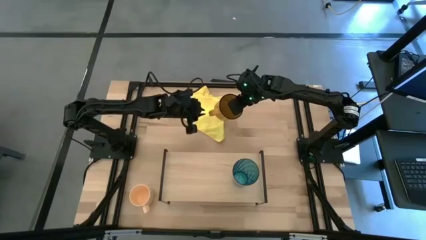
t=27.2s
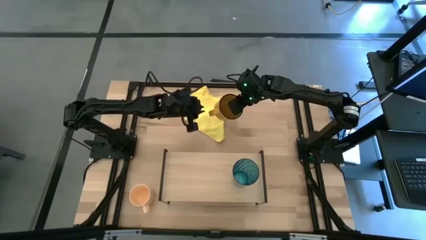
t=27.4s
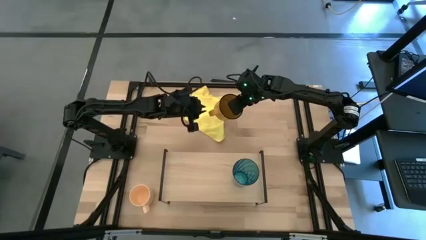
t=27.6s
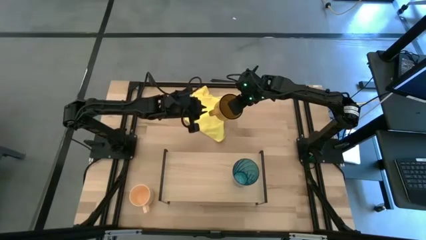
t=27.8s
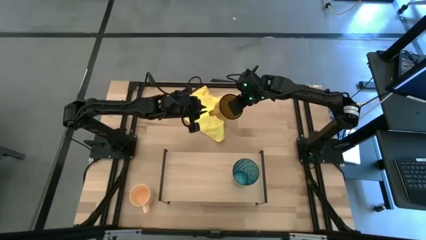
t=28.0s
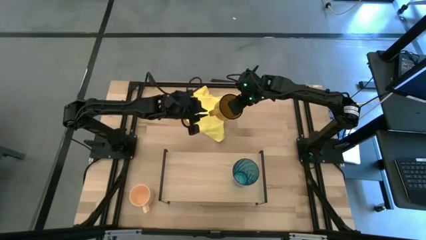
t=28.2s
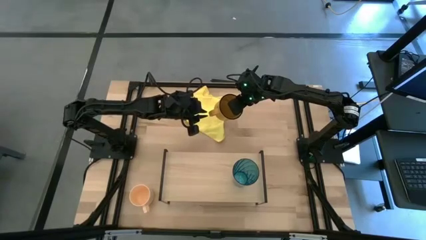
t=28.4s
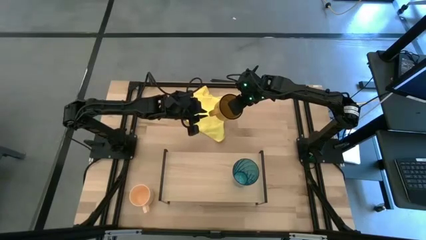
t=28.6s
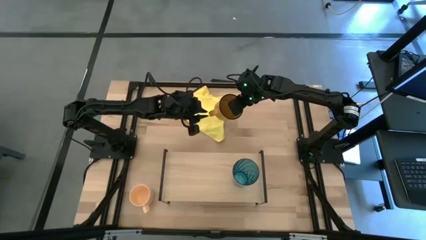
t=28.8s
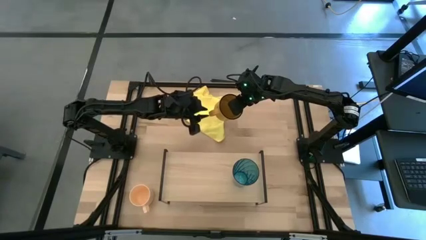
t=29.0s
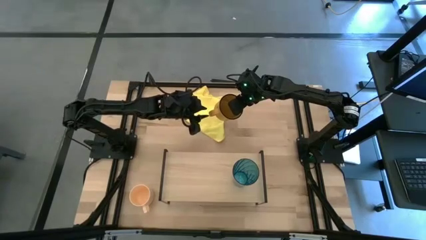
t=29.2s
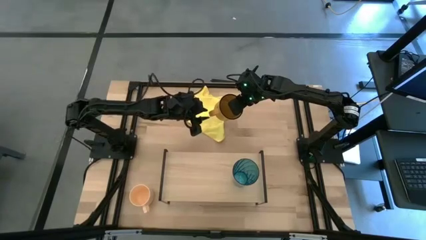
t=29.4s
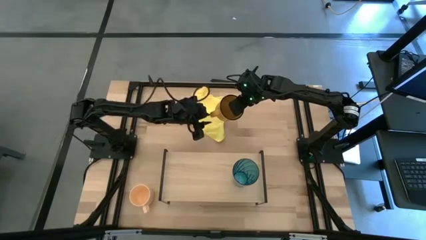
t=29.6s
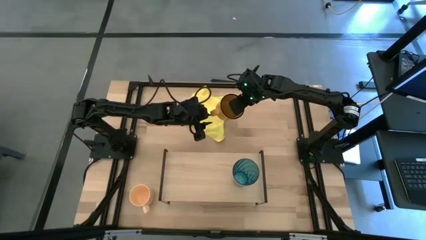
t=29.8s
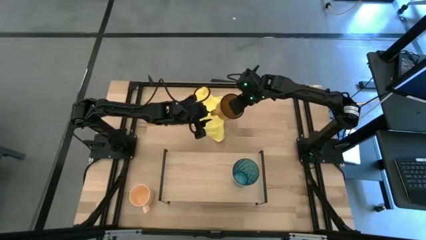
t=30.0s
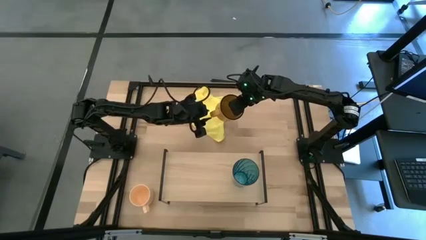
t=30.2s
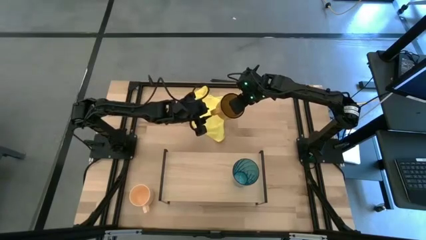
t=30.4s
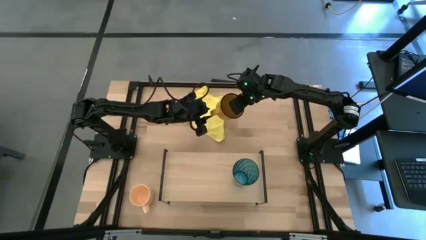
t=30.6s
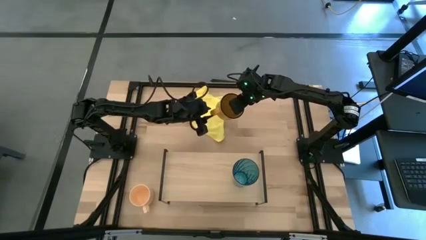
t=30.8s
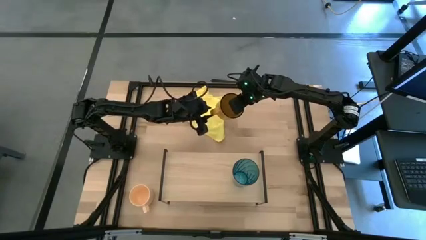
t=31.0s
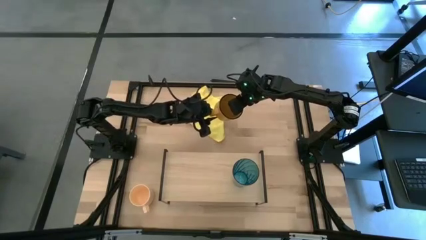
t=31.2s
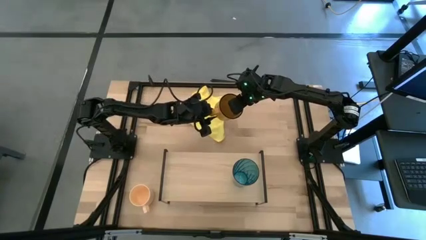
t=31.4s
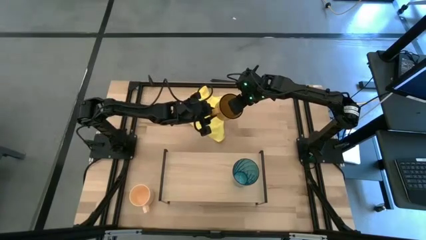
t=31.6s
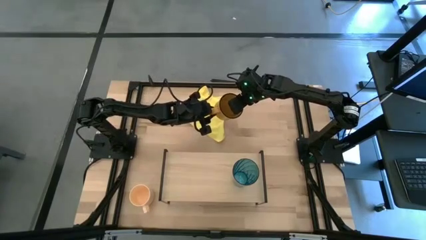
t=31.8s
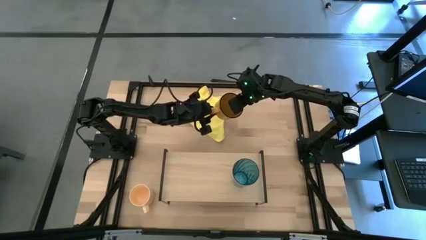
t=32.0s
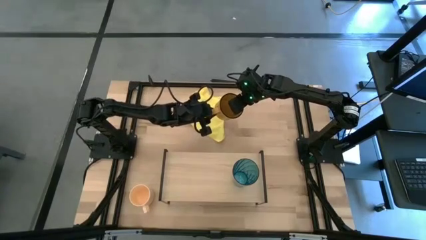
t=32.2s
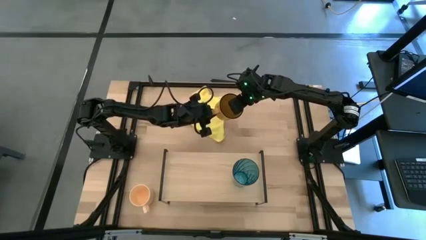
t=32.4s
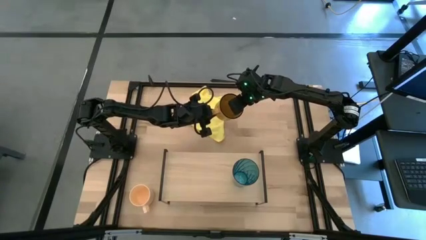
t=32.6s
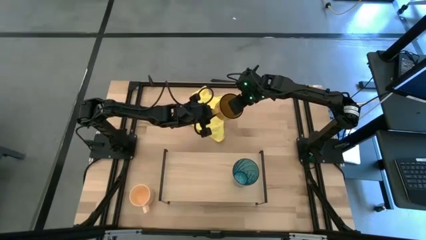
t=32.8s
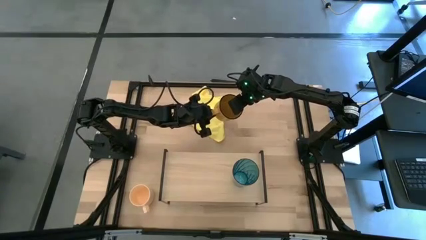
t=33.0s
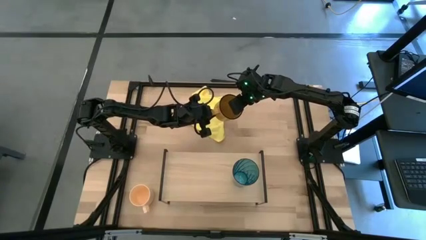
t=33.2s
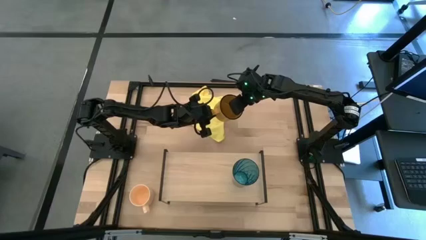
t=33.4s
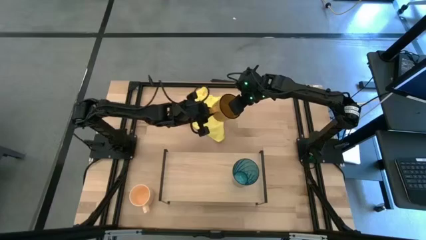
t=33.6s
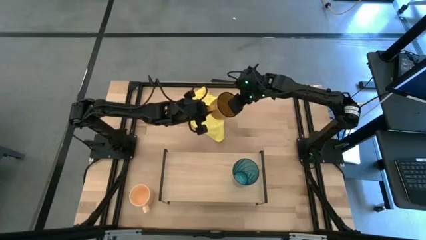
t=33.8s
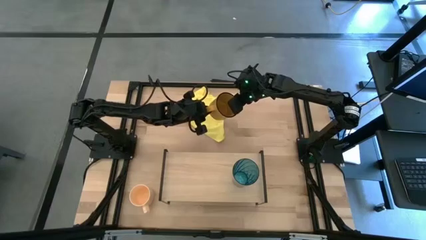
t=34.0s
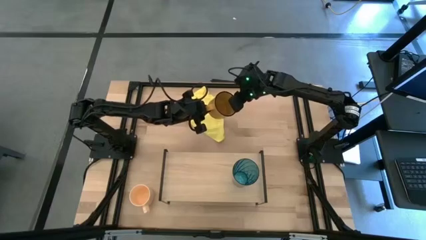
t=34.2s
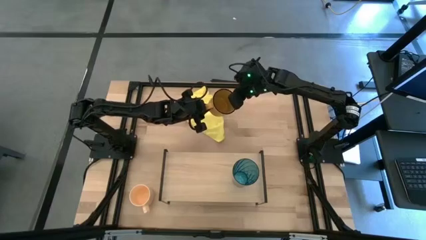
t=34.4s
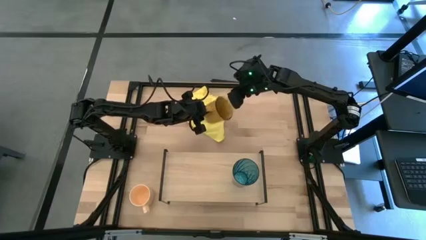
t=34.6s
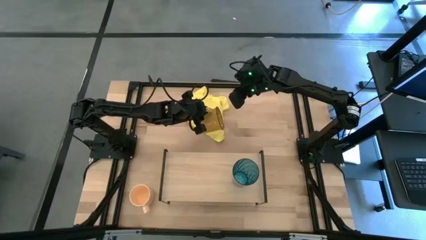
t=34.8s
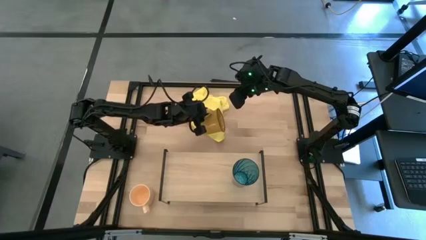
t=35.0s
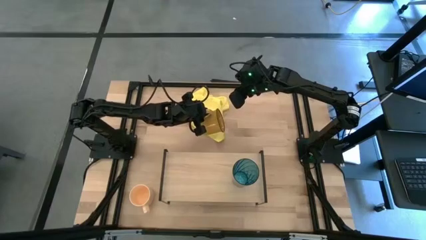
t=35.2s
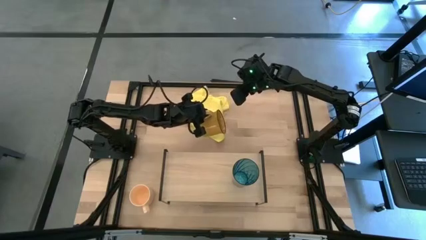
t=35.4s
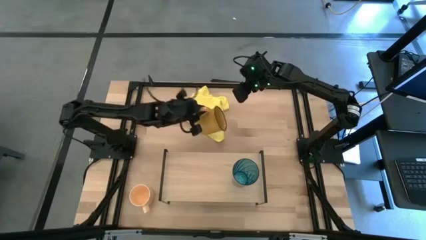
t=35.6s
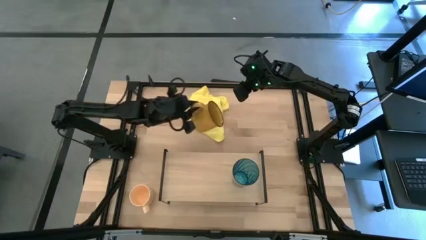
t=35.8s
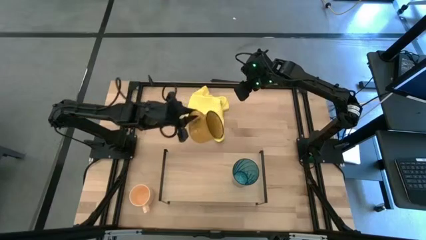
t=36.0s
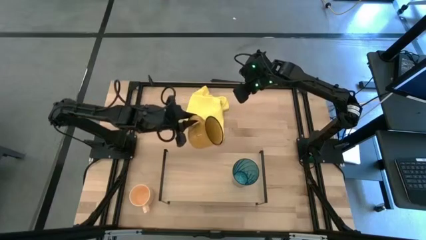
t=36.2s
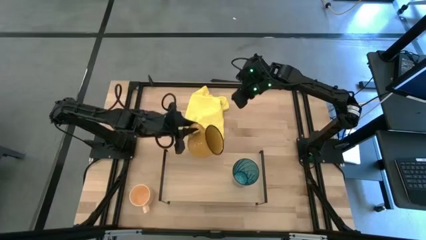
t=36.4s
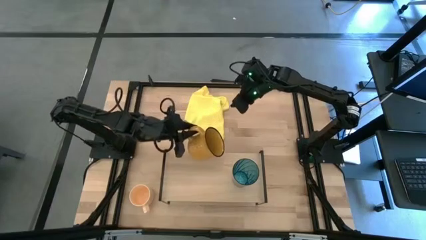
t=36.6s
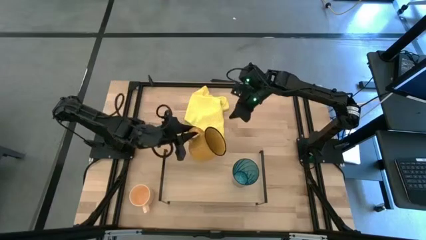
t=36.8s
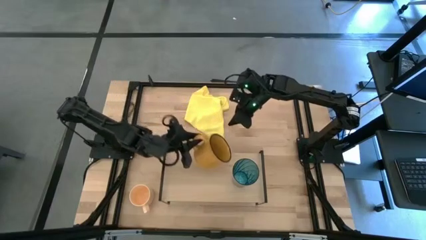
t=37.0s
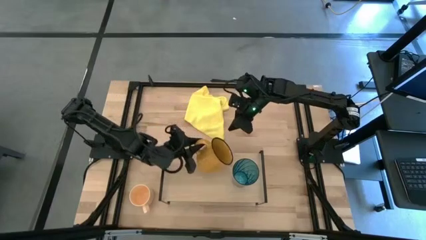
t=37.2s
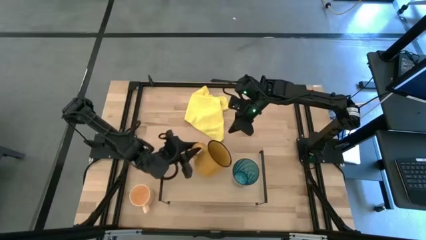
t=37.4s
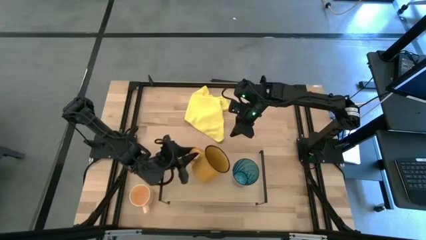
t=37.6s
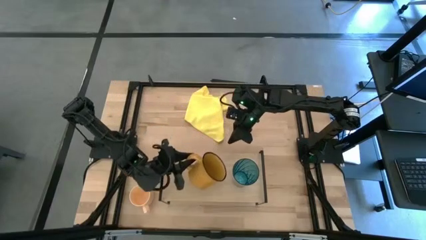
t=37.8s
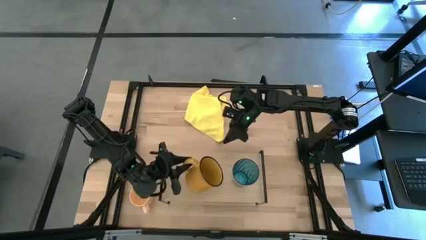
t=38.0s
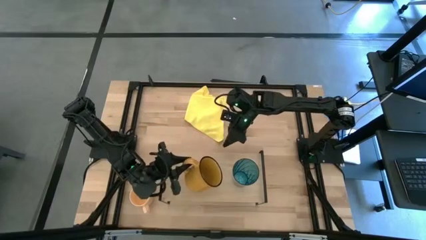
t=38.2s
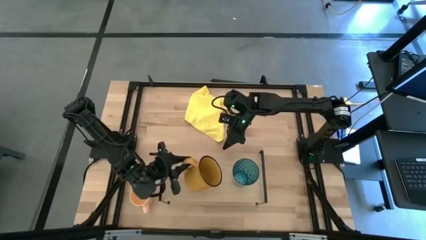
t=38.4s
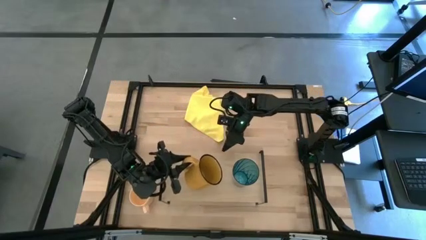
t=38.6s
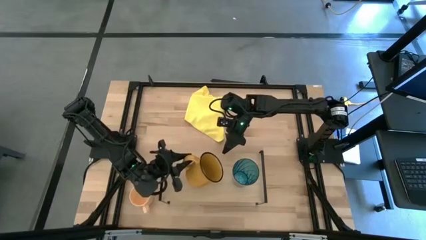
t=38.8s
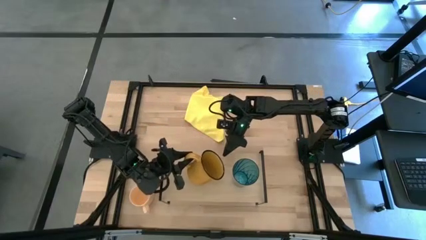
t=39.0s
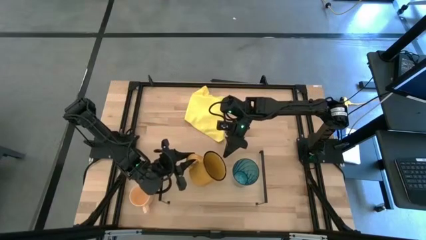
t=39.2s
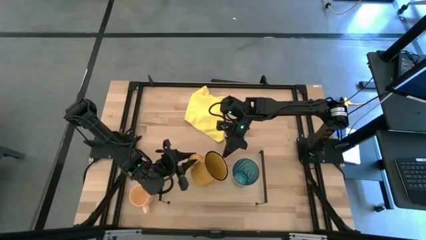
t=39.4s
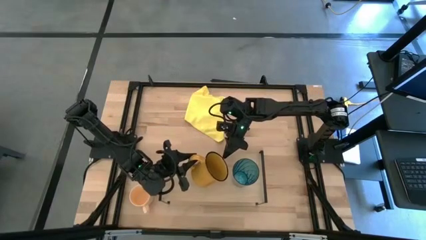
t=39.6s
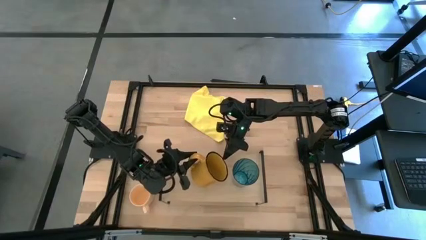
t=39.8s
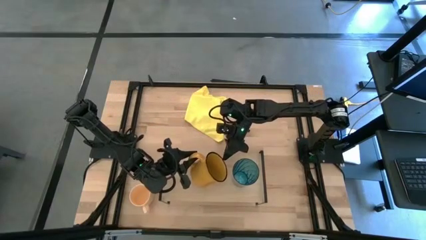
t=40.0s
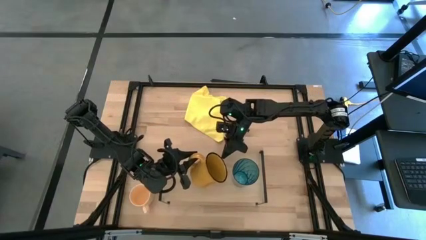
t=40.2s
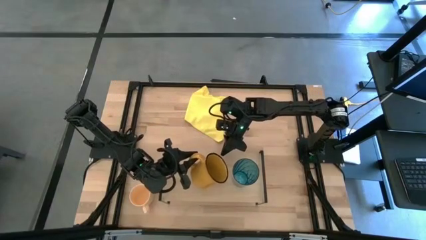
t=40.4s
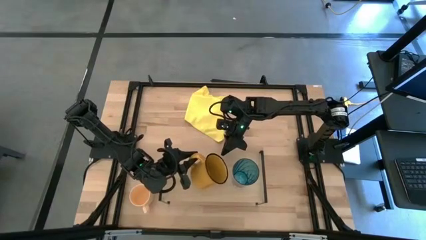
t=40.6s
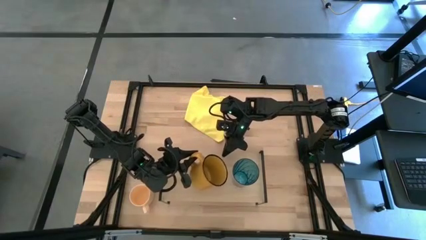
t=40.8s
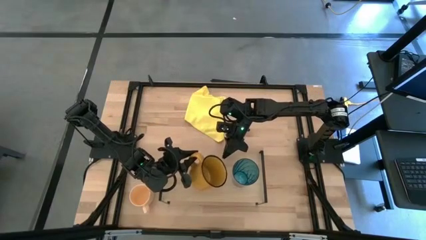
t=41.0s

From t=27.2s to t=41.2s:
Task: Stack small to large cups/mugs on shelf
Put the brown mug on the shelf
